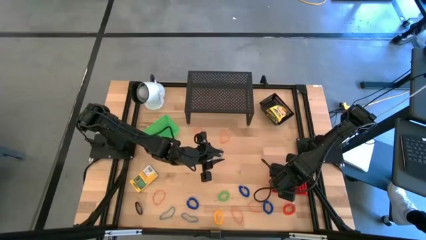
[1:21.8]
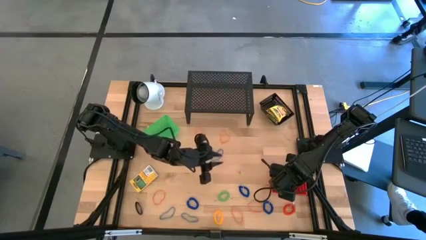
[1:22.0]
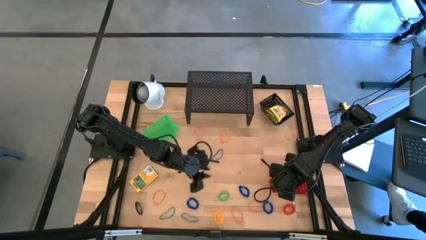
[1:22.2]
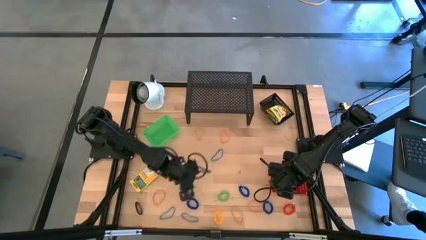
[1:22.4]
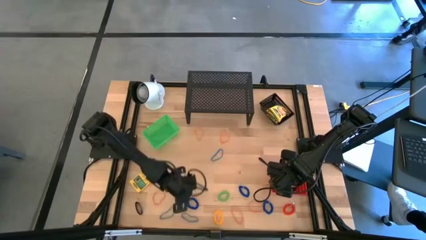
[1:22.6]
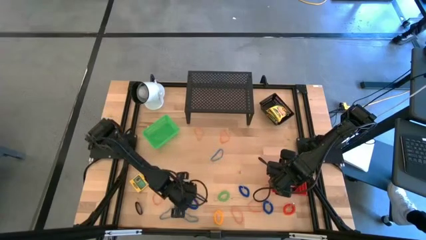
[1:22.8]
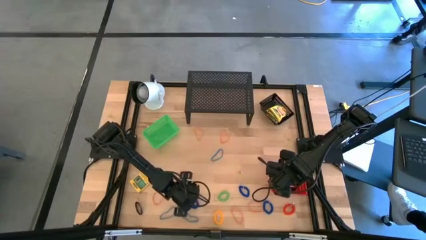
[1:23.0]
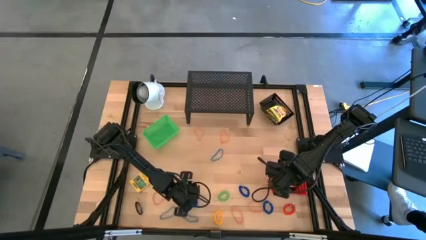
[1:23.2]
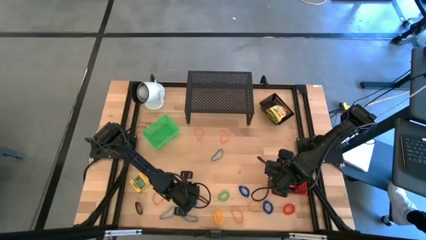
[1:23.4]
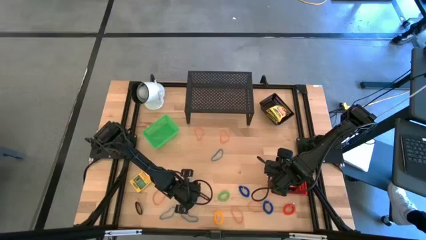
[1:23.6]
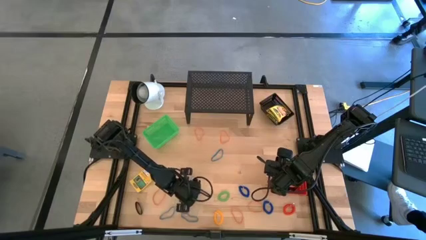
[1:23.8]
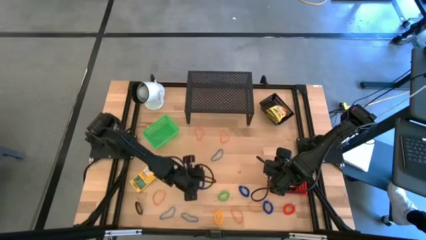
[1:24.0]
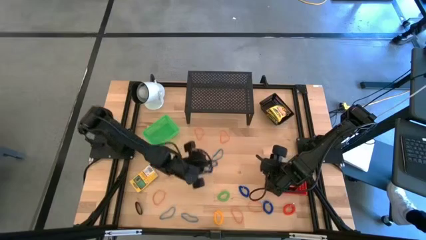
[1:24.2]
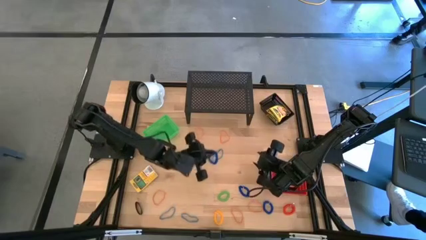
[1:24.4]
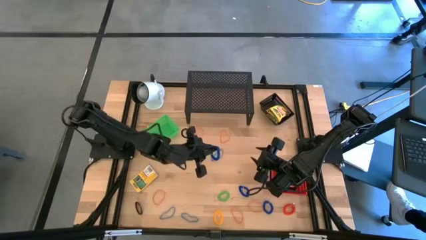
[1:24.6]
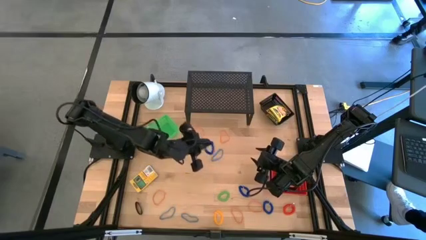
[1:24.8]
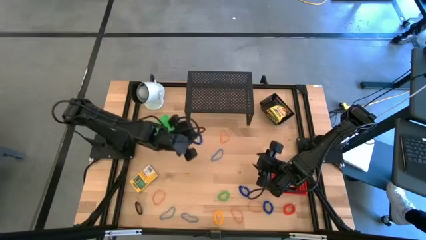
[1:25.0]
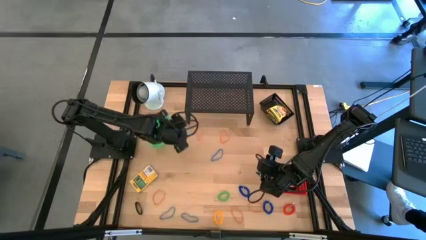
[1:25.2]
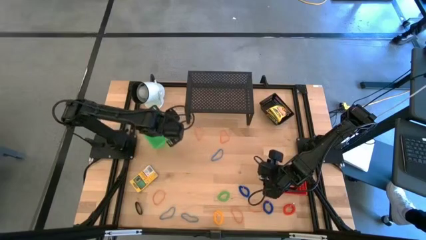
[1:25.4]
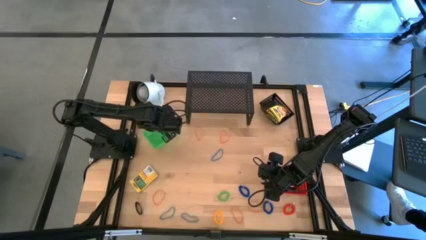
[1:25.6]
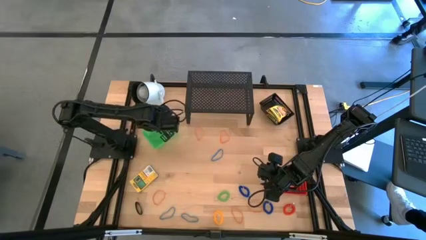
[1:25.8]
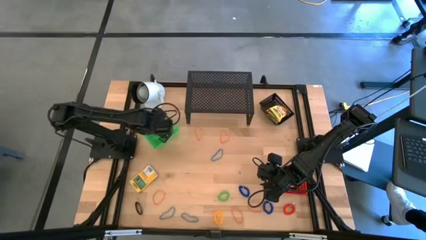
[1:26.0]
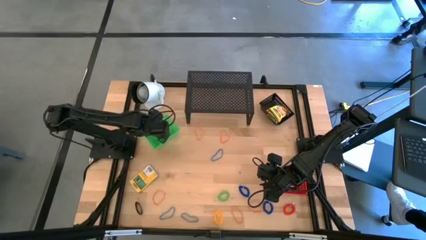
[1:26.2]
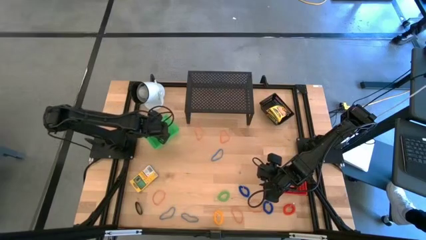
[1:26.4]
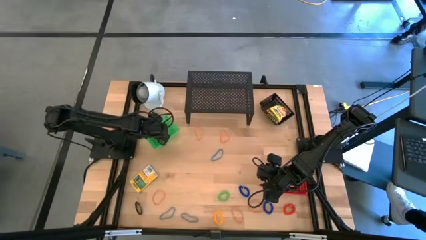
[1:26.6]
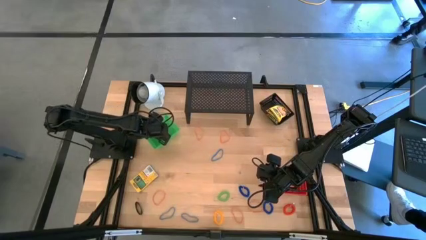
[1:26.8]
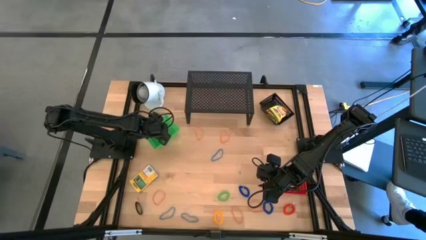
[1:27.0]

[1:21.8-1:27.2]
Task: Pick & Place Office Desk Supplies
Put the bottom left blue spring keychain into the green bin

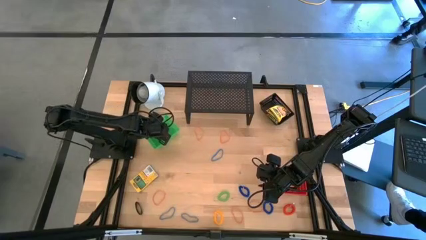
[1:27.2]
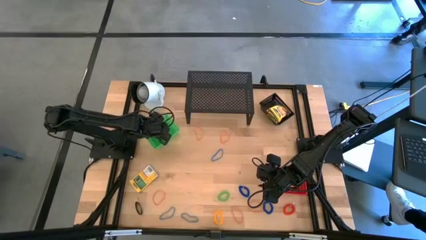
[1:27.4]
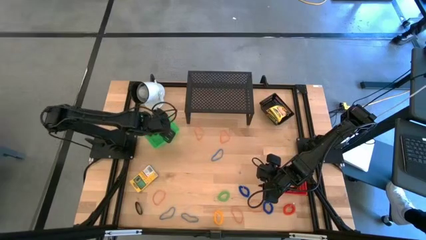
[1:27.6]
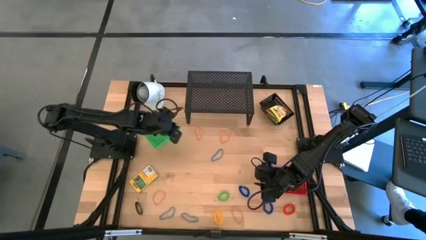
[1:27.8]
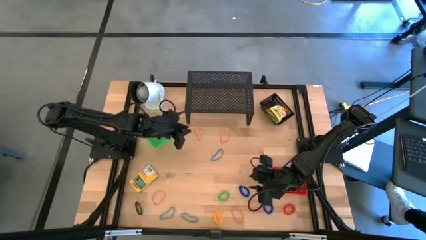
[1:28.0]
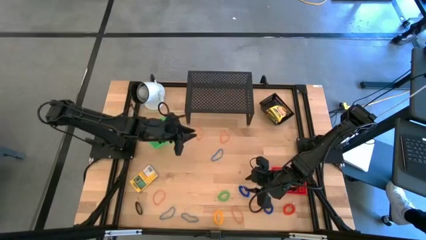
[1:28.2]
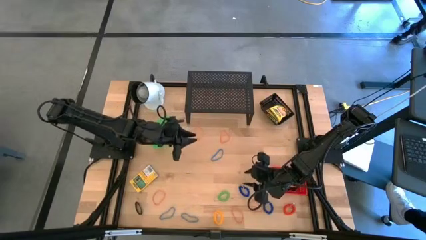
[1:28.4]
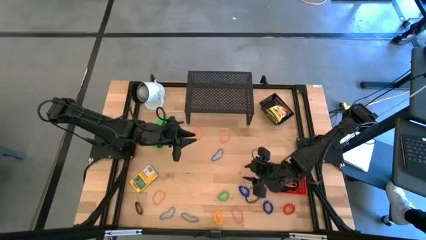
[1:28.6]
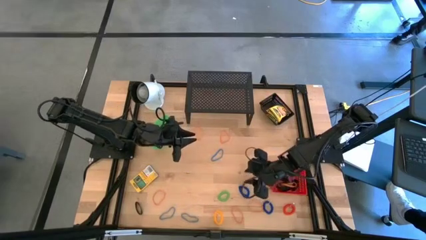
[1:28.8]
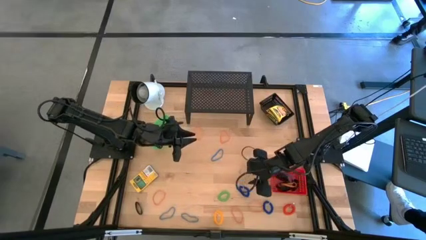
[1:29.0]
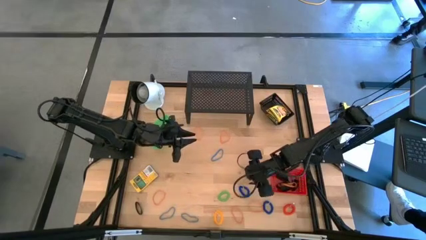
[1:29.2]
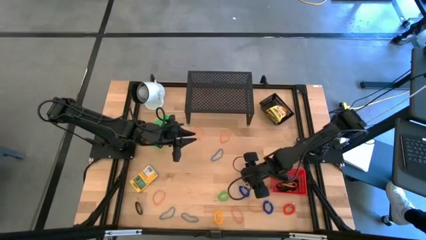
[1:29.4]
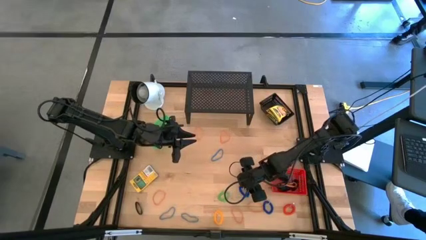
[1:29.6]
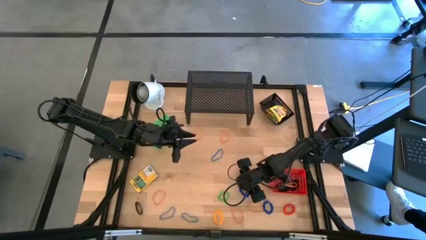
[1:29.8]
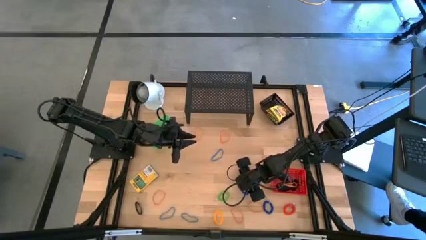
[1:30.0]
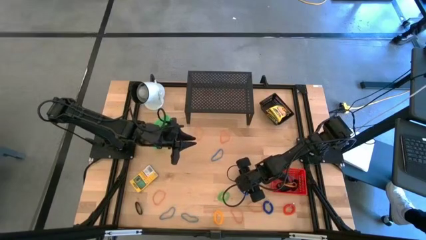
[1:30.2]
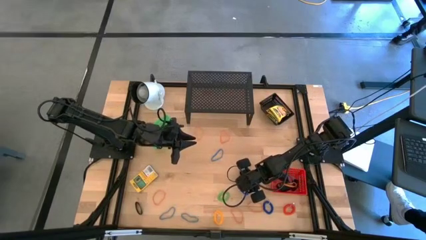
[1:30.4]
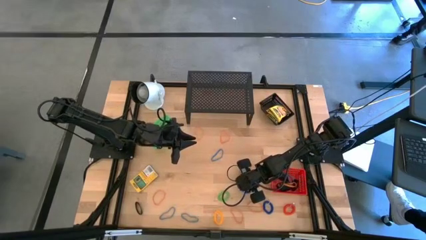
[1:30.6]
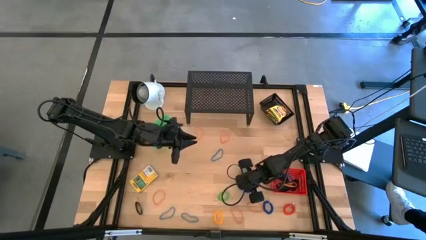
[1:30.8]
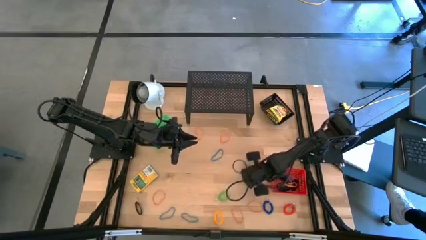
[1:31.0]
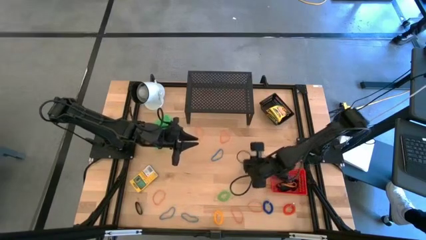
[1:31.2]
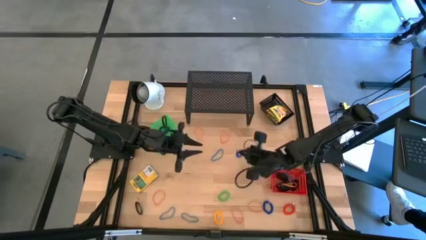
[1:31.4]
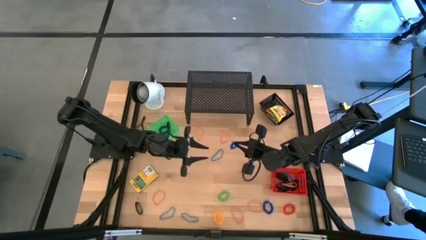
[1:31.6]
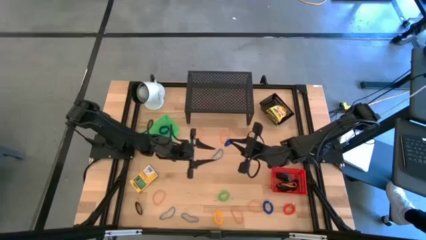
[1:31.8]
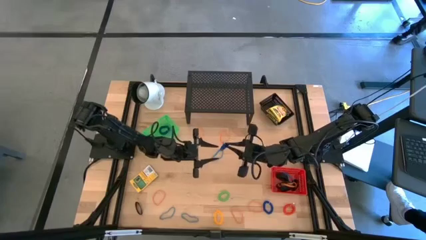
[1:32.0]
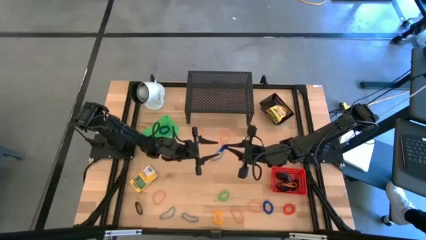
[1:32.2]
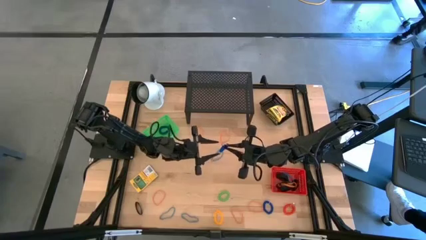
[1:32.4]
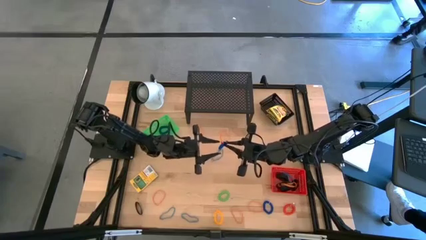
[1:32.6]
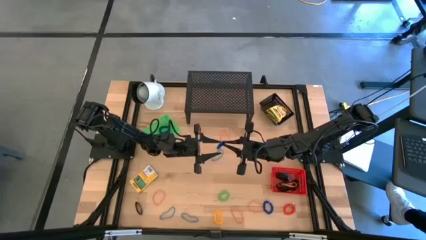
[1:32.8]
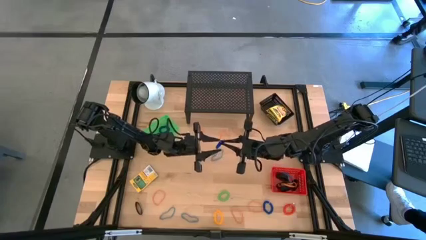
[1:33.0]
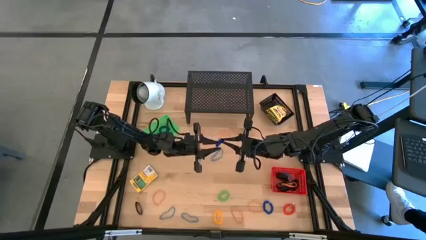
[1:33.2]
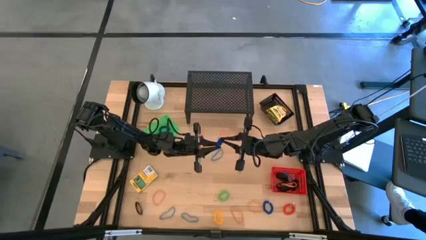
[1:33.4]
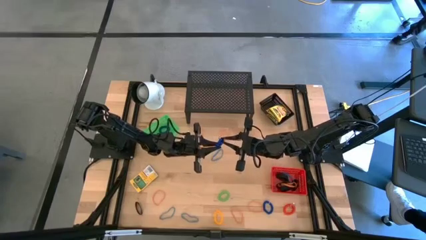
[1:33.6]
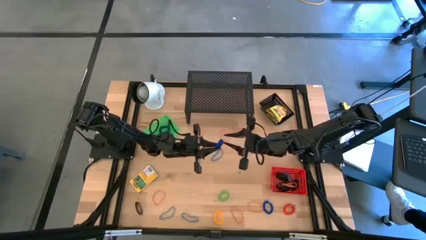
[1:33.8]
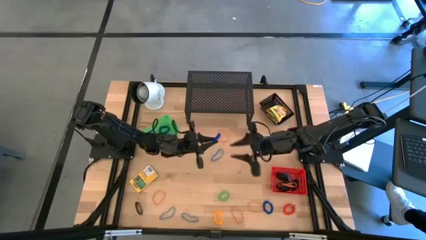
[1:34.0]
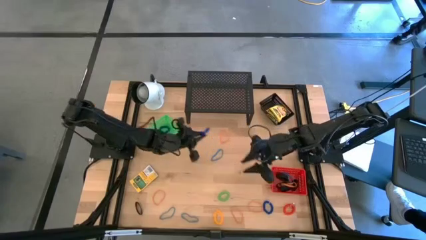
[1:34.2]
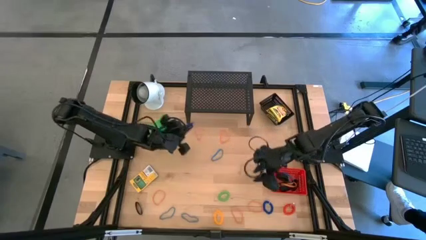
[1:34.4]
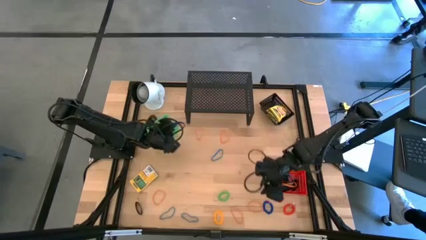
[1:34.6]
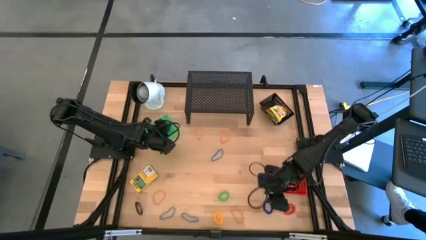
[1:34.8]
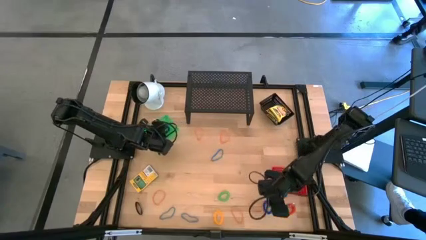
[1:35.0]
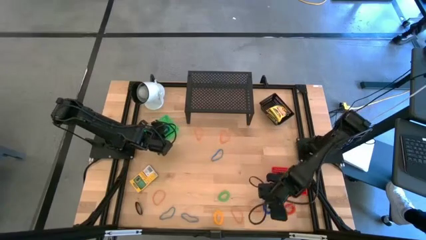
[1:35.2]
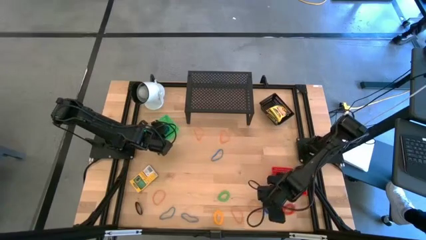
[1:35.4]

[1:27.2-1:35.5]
Put the top blue spring keychain into the green bin

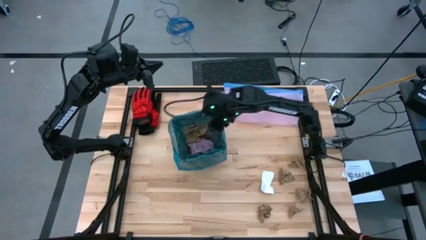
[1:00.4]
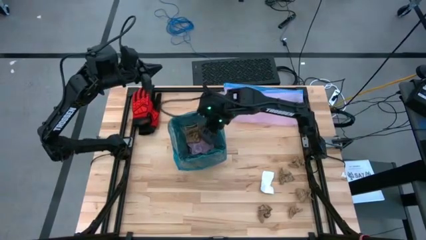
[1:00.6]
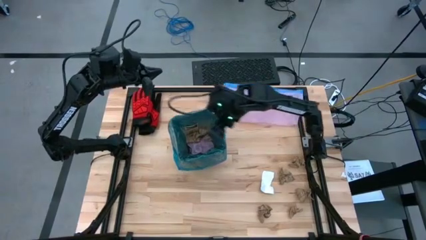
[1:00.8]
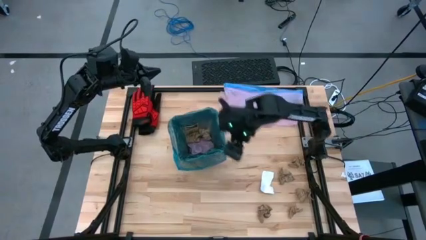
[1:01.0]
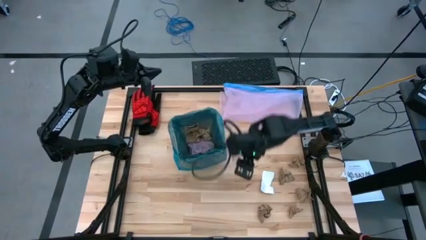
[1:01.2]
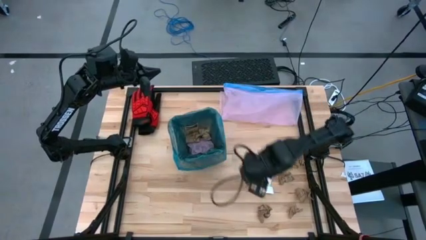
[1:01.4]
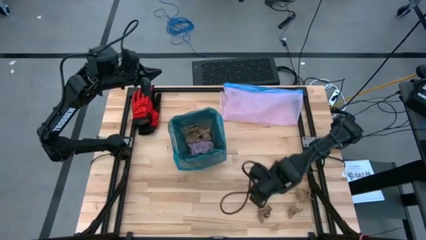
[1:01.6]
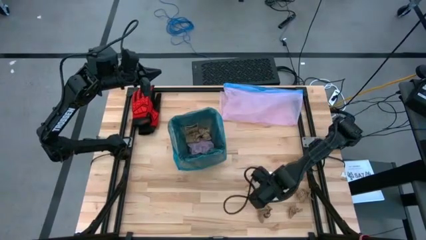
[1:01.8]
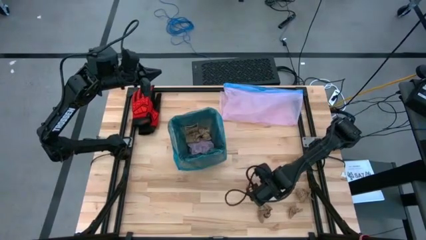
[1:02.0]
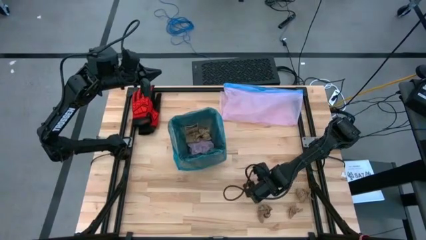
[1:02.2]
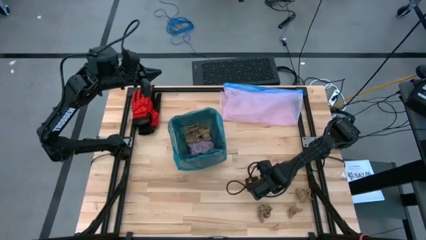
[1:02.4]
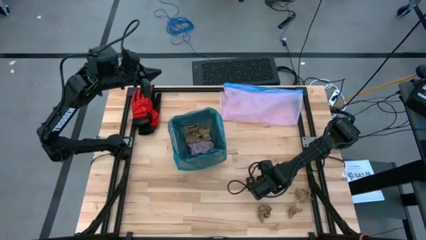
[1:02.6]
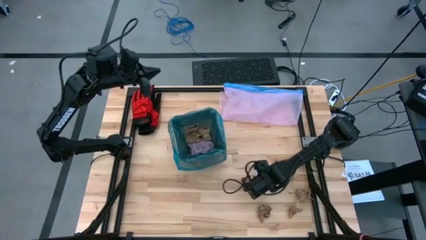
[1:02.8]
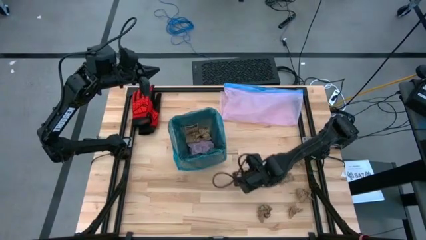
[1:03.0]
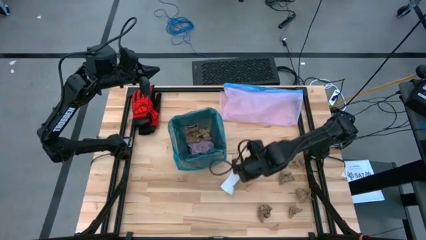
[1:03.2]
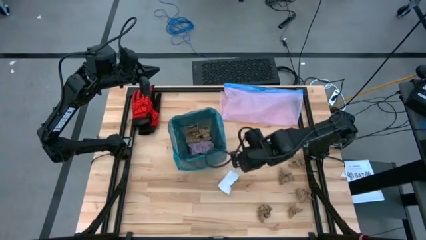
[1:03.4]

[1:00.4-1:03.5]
Task: place trash/remove bag and relplace
Put the piece of white cardboard into the black trash bin
